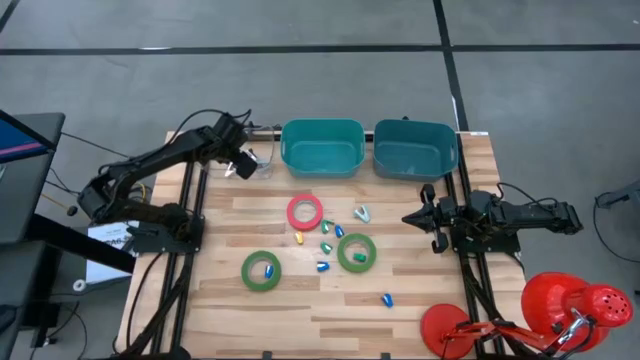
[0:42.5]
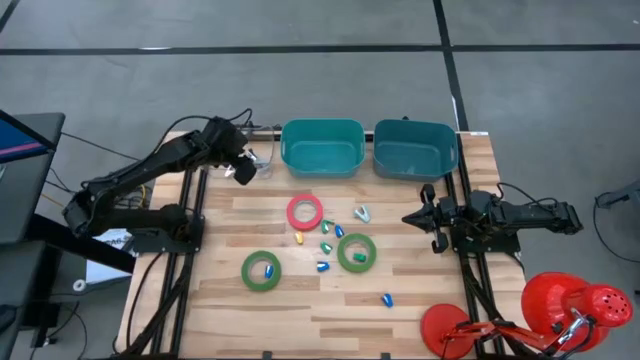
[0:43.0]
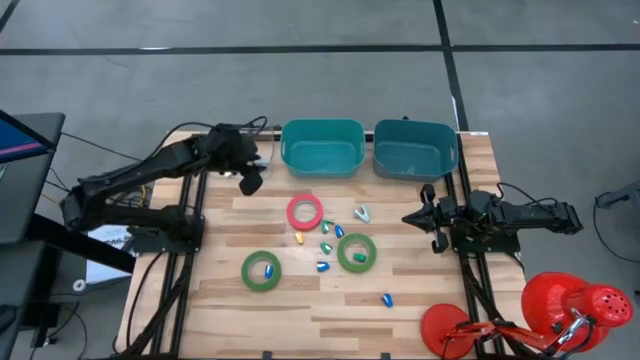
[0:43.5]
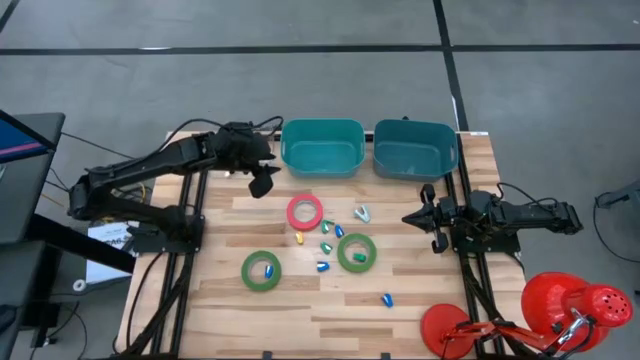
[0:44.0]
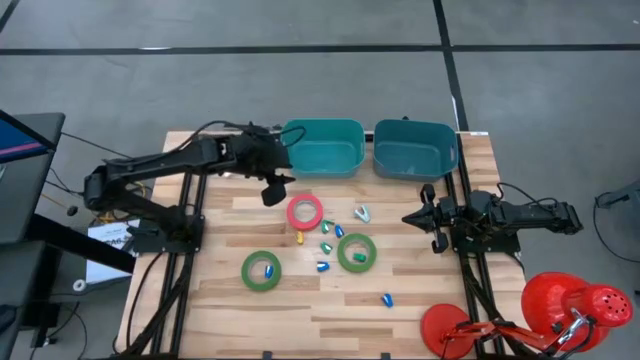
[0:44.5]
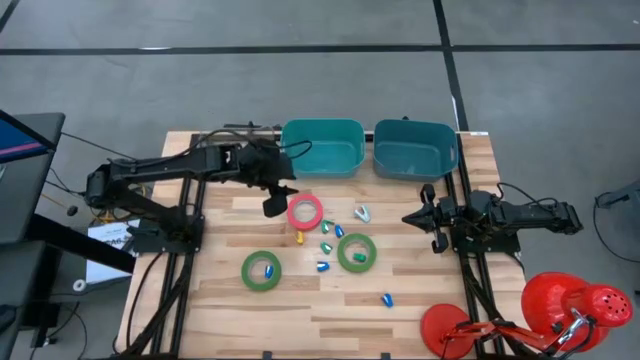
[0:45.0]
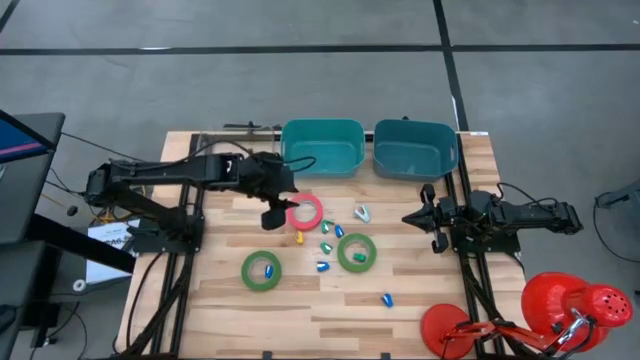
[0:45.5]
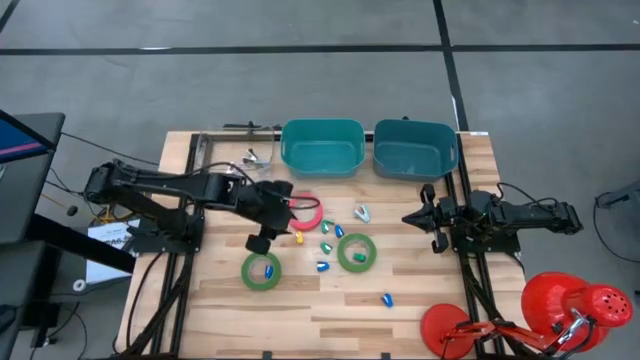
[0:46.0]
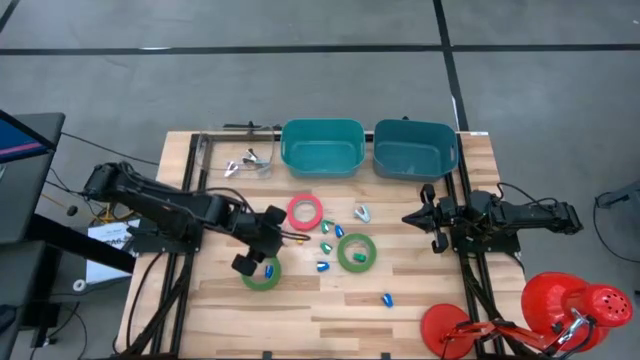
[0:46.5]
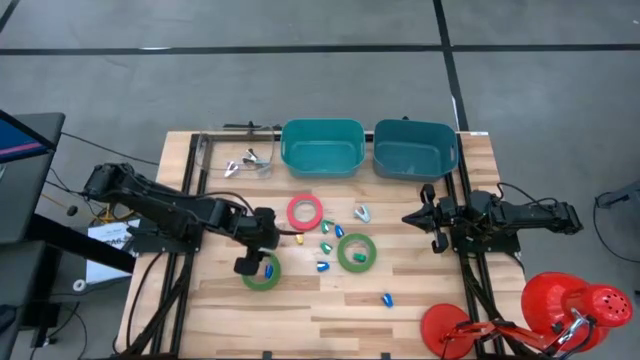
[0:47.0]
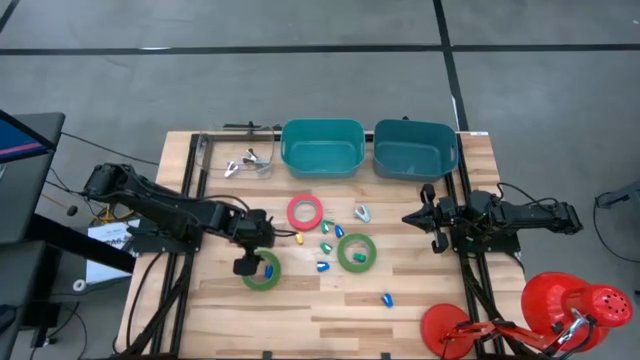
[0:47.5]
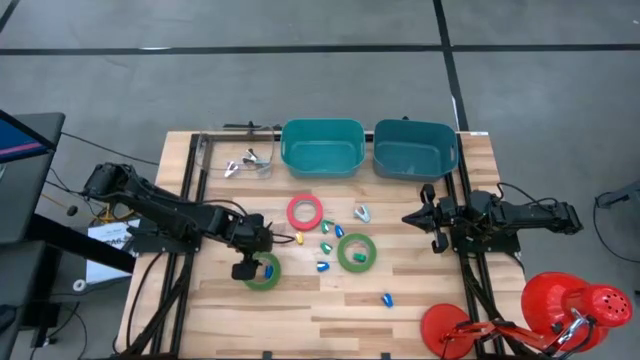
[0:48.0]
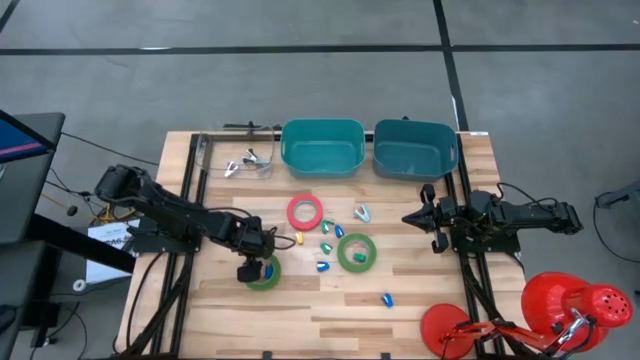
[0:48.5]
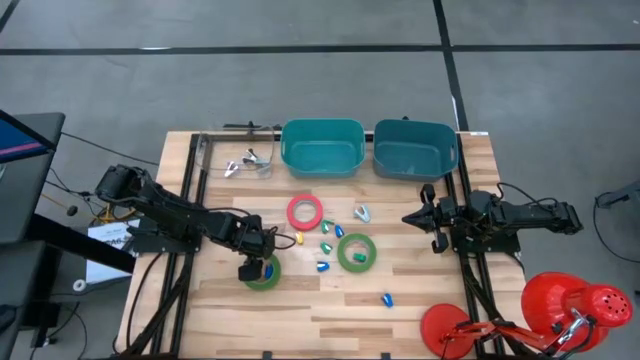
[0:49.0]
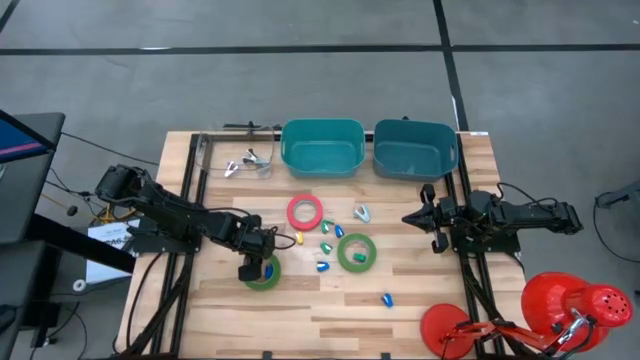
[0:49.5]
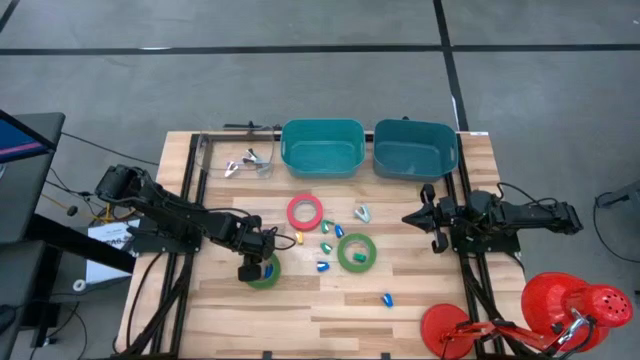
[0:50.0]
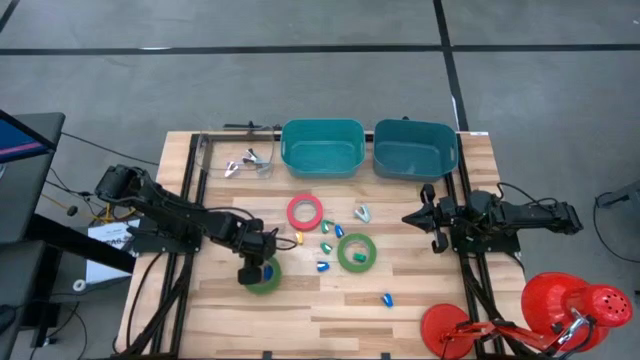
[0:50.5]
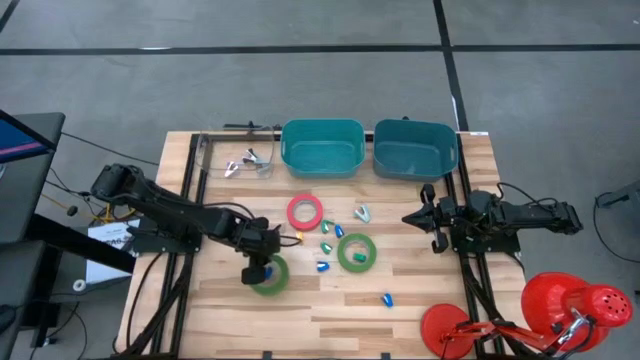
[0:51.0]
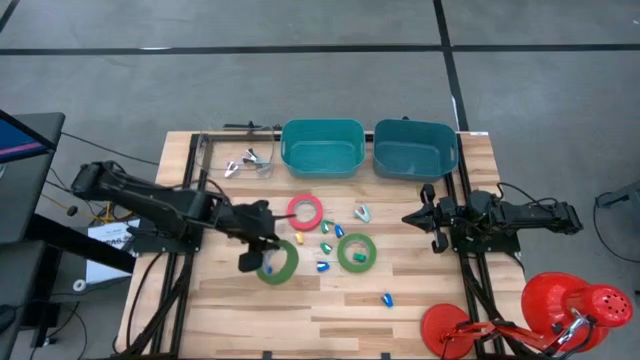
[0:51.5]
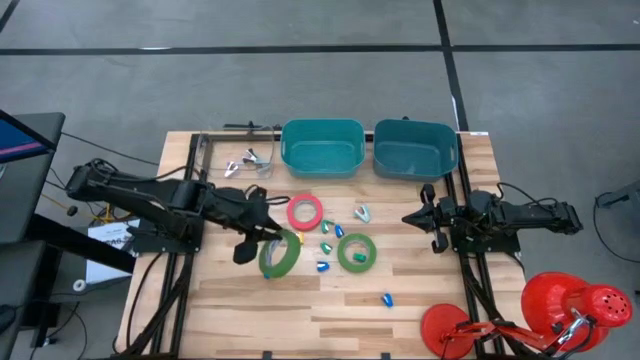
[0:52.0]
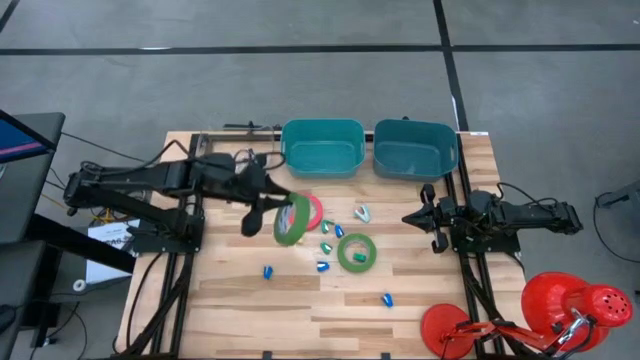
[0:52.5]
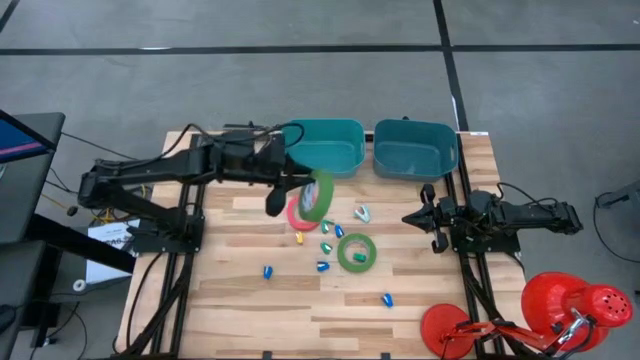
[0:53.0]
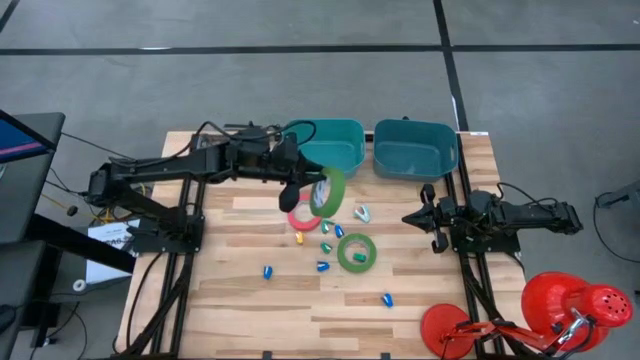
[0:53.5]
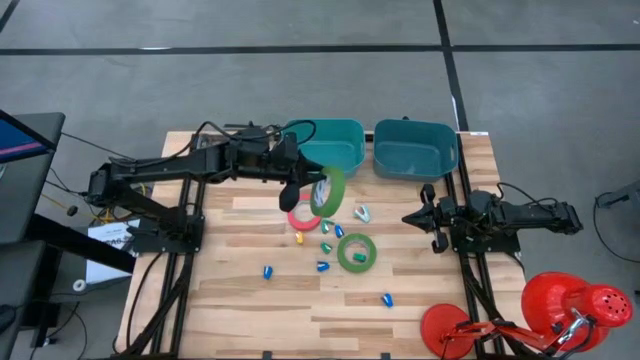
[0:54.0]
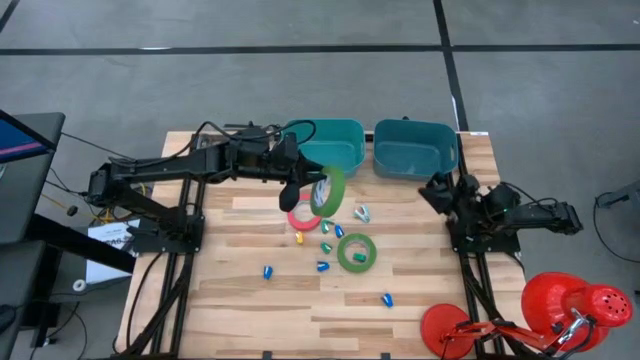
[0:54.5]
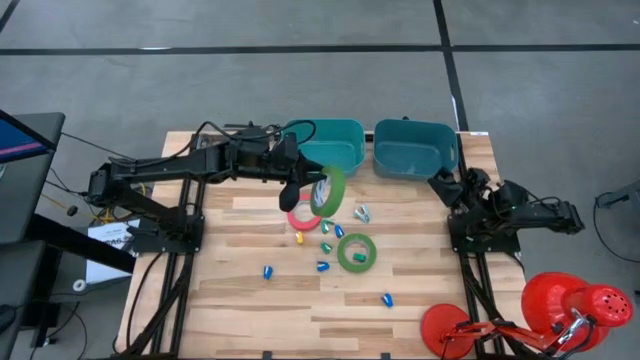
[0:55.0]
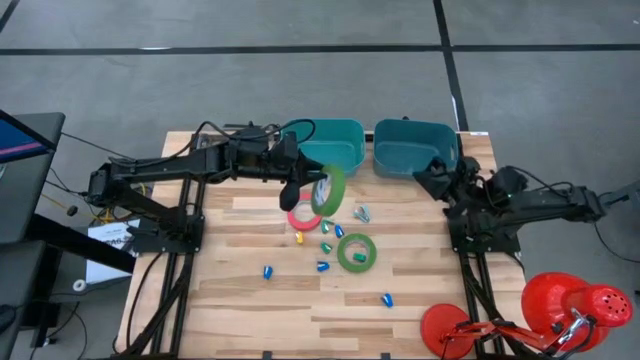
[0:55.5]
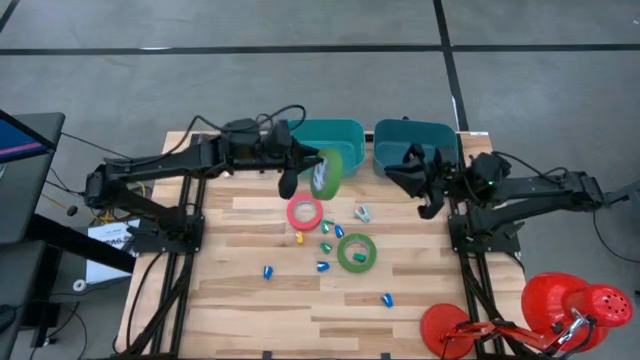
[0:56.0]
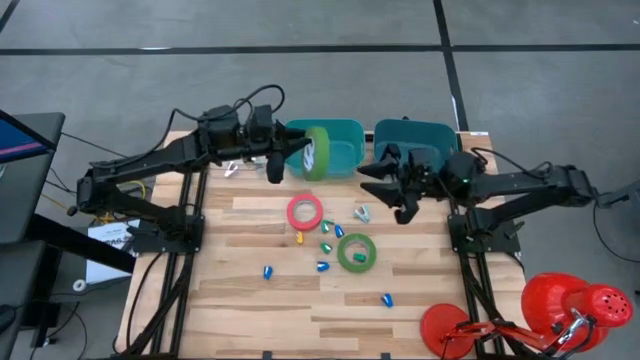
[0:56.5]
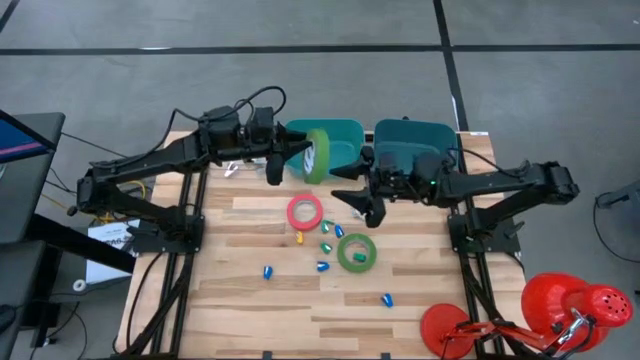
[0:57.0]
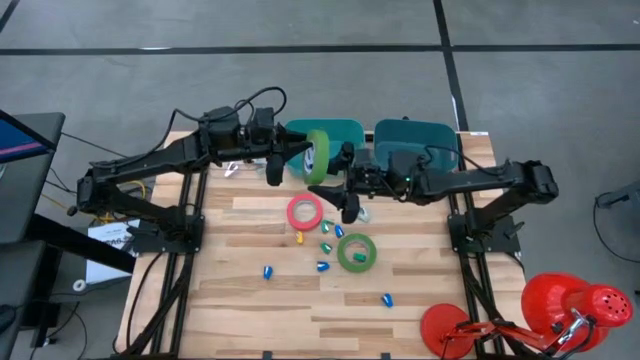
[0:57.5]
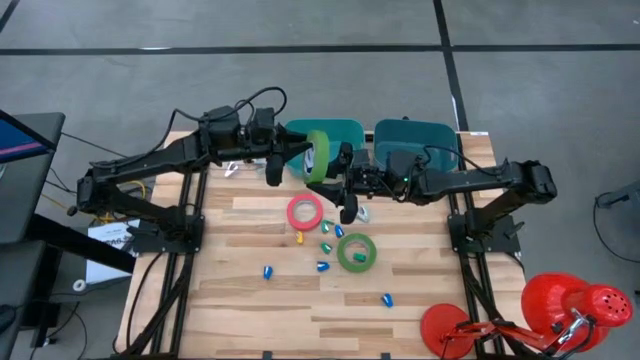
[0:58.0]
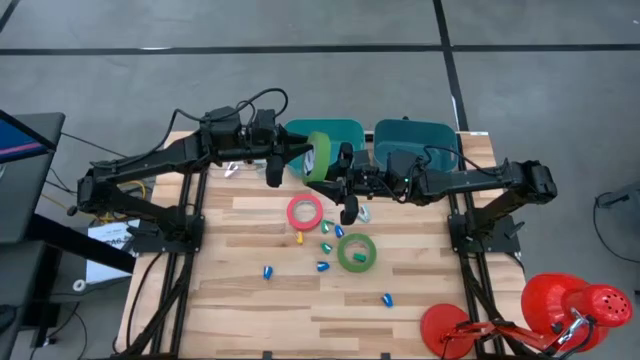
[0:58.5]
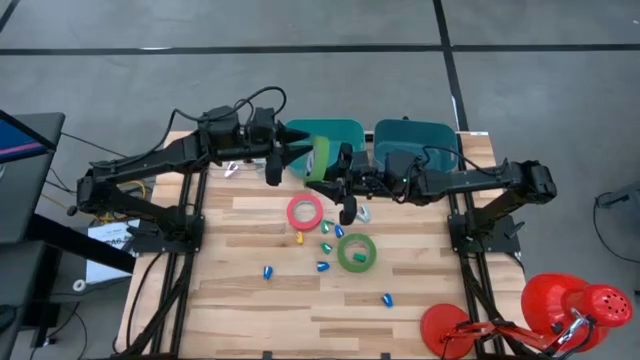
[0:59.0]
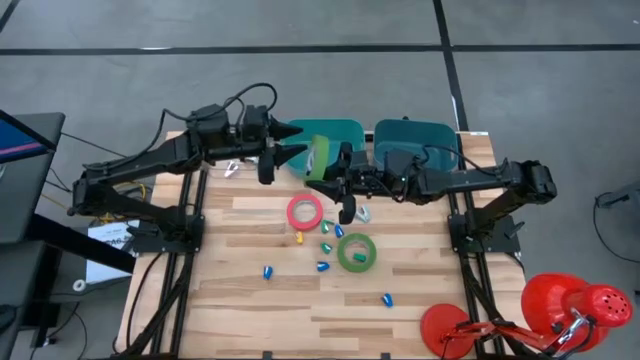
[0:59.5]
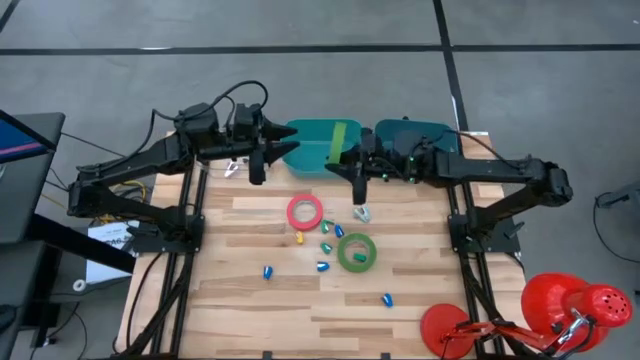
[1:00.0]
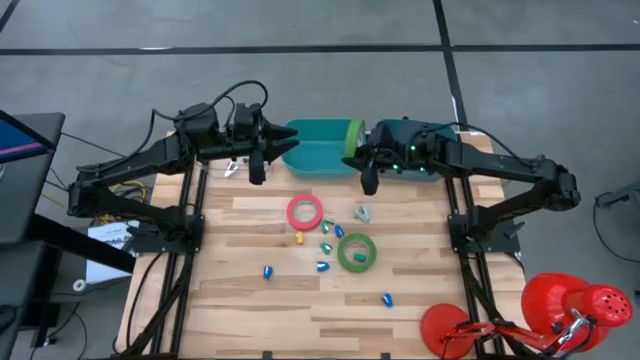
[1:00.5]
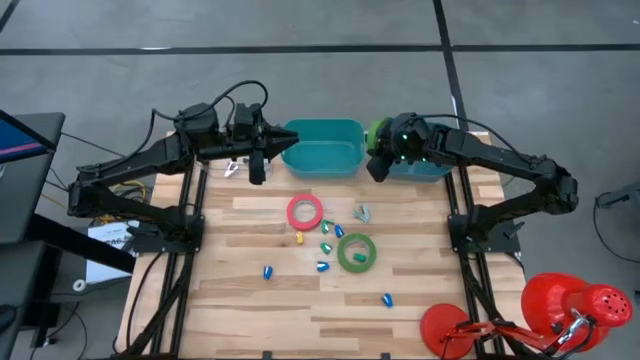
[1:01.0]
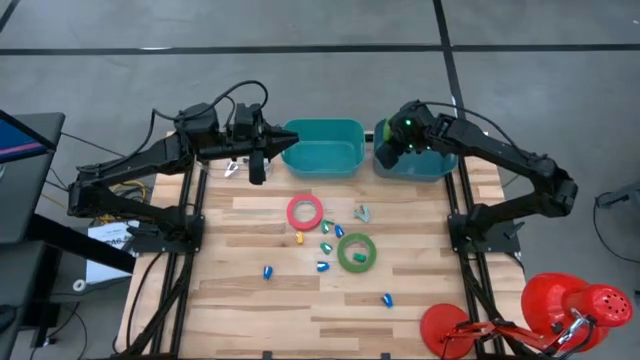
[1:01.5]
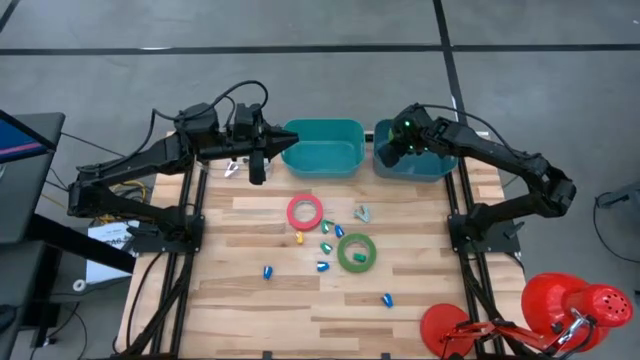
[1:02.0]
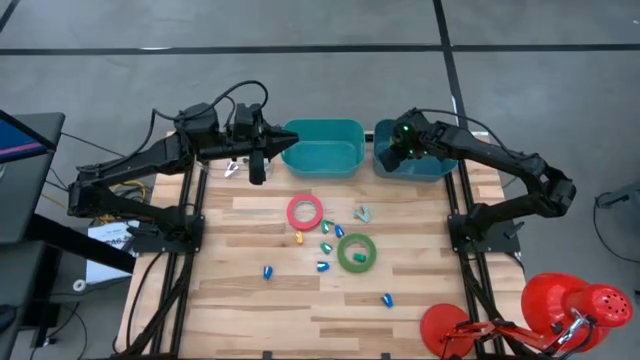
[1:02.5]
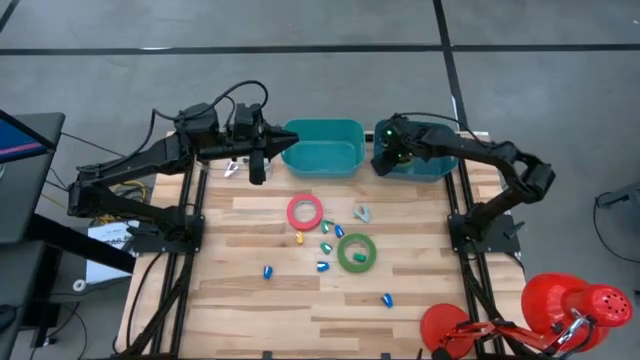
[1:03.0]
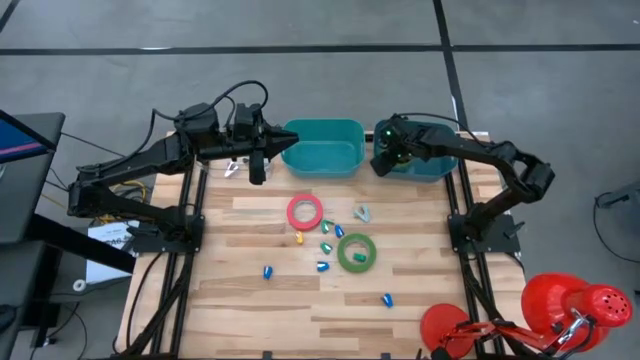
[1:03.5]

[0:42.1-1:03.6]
Task: Pick and place Stapler, Stapler remover, tape
Put the green tape into the blue bin
